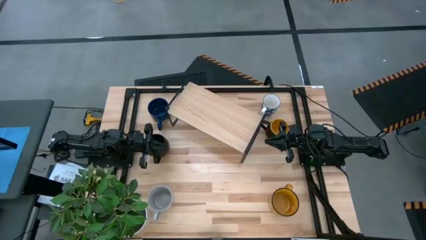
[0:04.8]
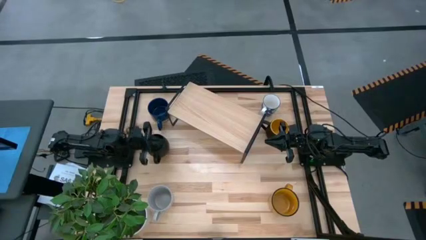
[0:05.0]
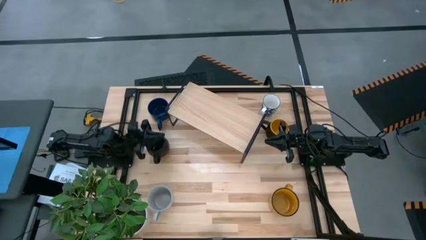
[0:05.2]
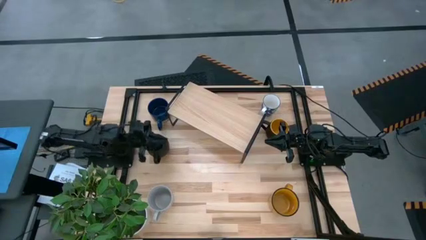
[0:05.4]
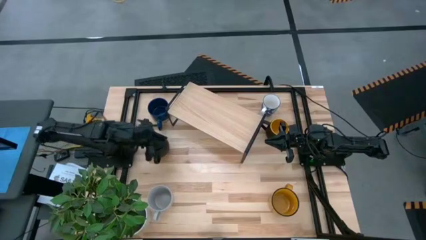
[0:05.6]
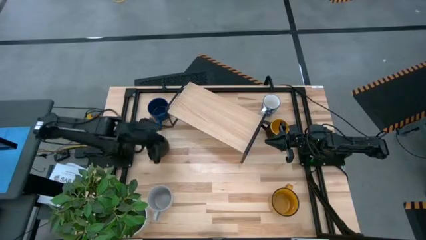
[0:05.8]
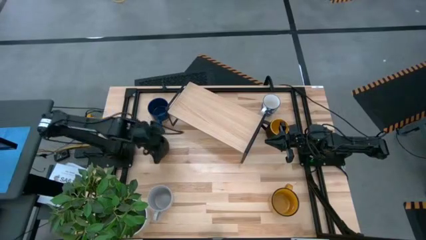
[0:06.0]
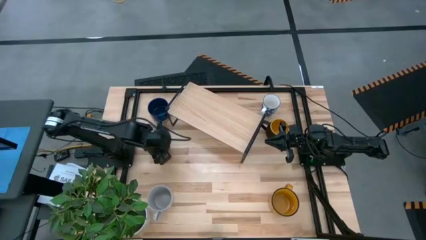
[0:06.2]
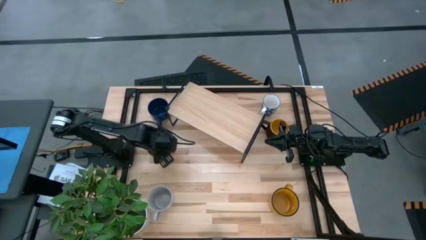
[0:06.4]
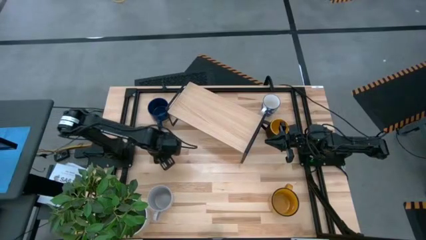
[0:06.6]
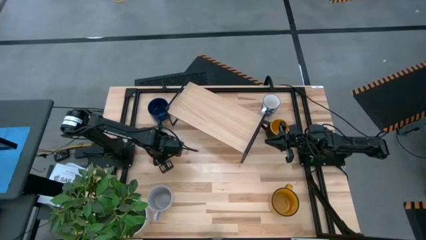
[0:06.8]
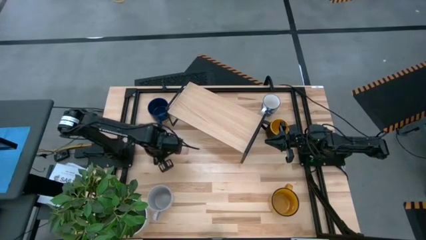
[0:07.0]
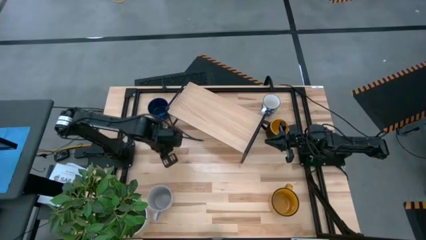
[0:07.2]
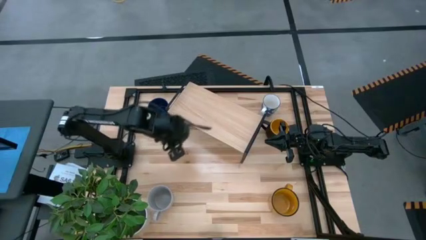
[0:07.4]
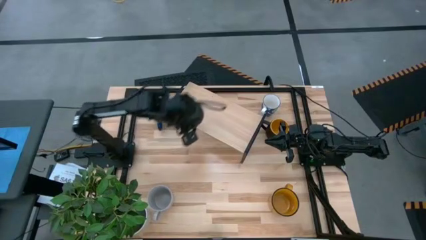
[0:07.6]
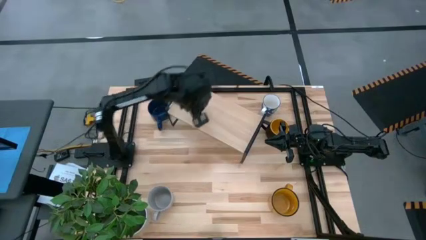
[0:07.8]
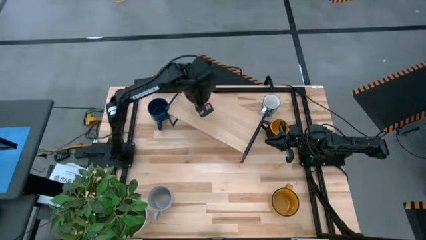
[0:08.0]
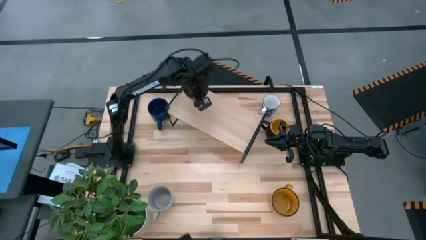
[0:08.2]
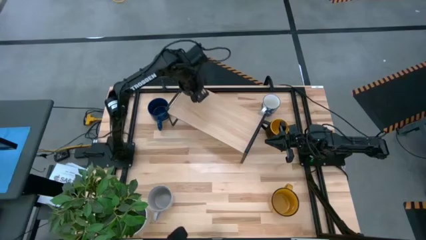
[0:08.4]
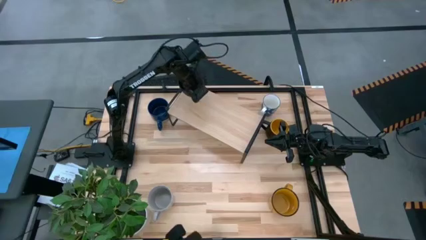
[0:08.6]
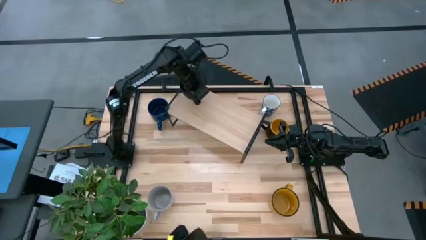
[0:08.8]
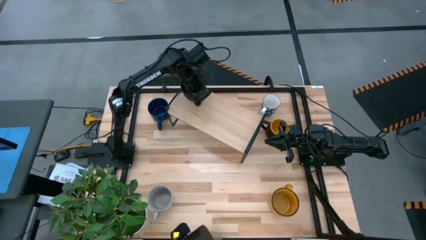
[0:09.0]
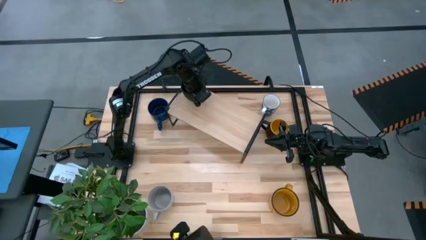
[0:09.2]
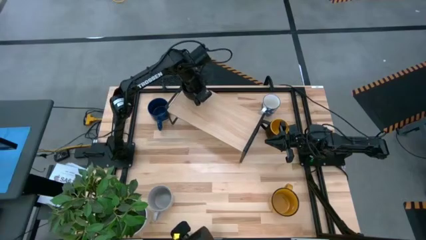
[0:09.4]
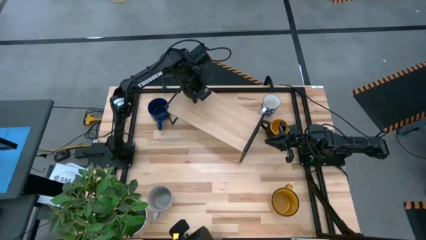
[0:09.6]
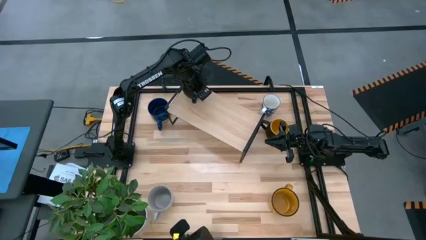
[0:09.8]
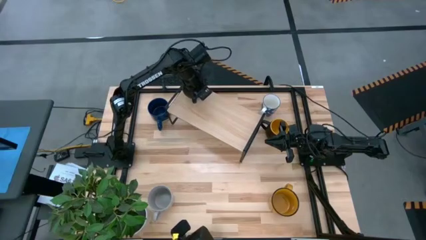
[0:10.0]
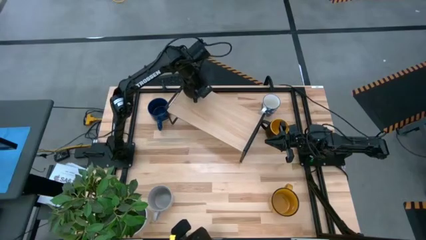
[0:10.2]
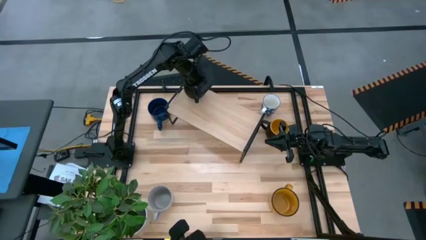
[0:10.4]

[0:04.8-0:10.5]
Task: Place coffee mugs
Put the black mug on the shelf

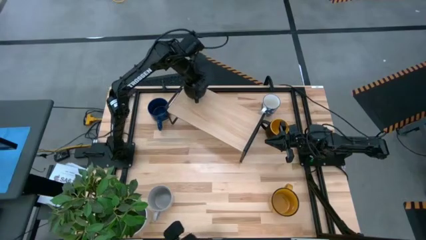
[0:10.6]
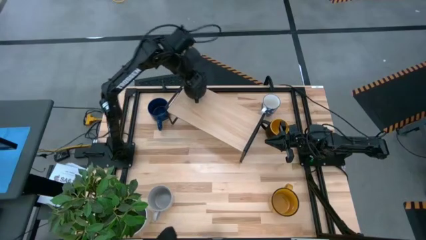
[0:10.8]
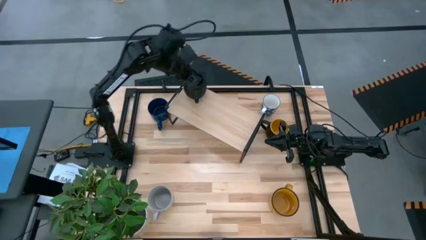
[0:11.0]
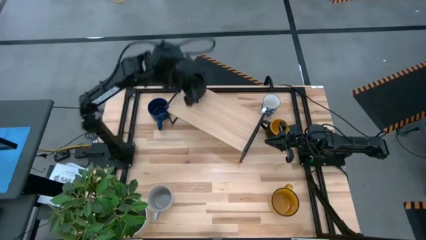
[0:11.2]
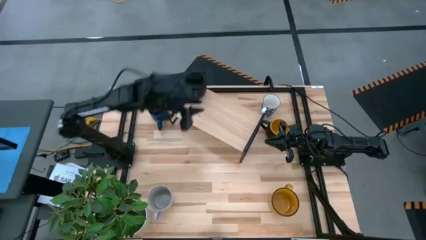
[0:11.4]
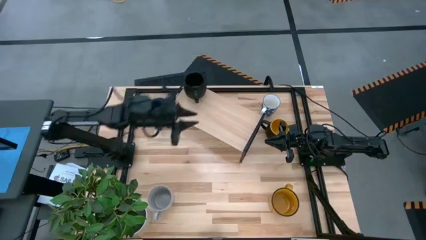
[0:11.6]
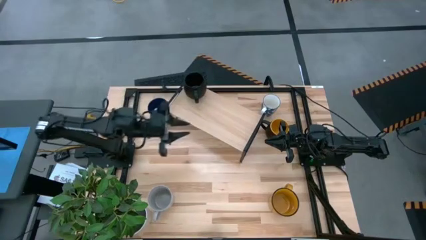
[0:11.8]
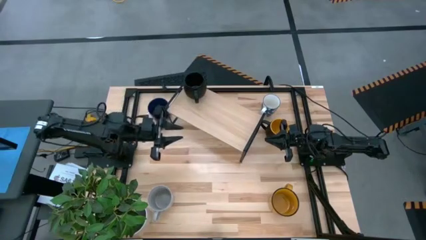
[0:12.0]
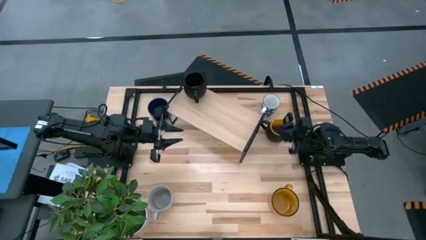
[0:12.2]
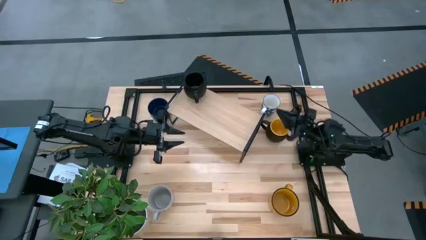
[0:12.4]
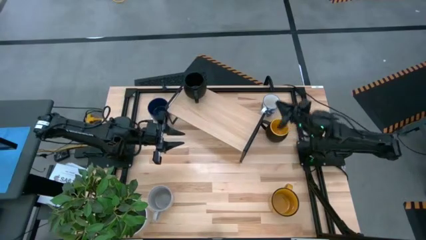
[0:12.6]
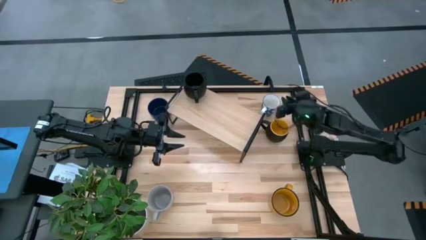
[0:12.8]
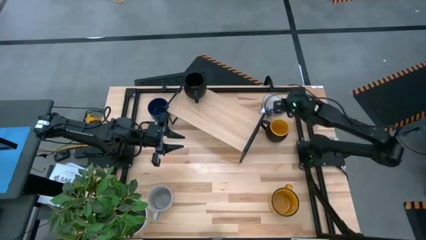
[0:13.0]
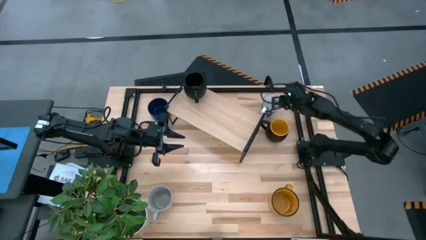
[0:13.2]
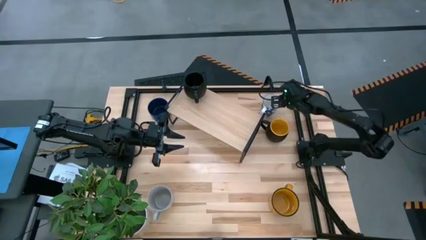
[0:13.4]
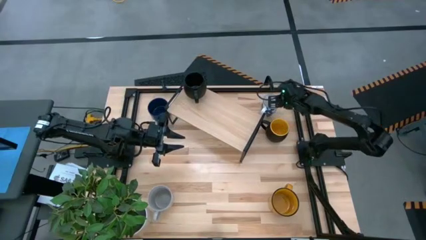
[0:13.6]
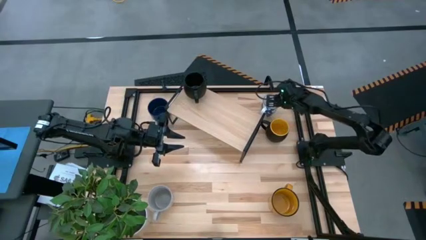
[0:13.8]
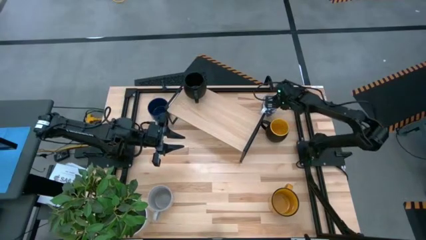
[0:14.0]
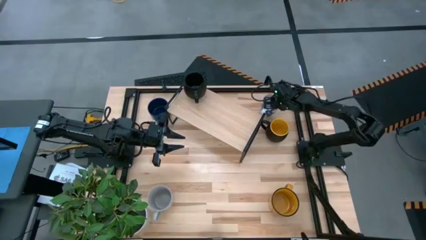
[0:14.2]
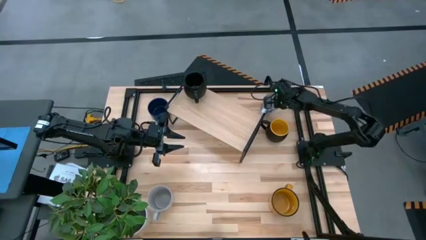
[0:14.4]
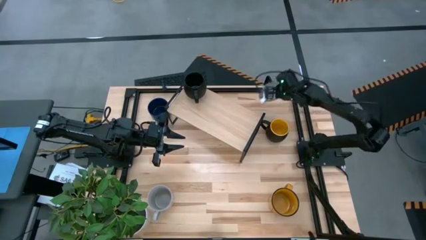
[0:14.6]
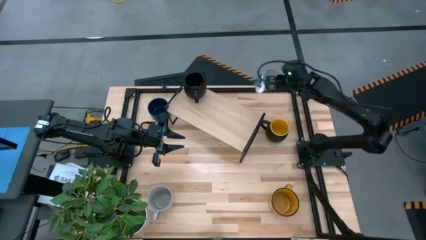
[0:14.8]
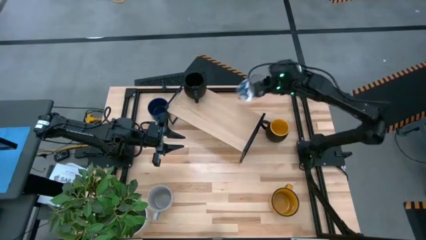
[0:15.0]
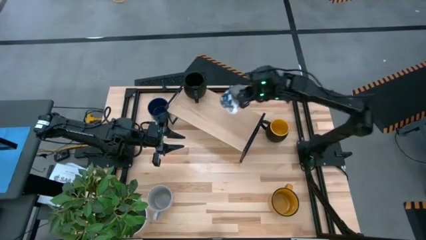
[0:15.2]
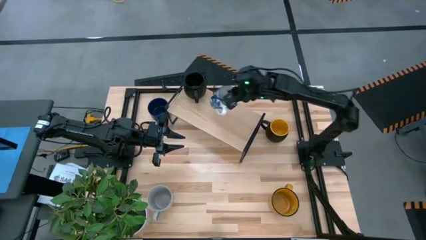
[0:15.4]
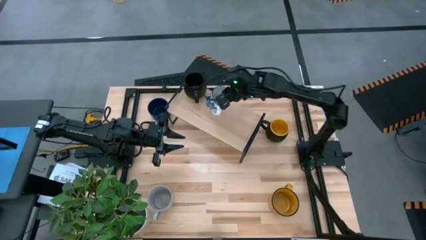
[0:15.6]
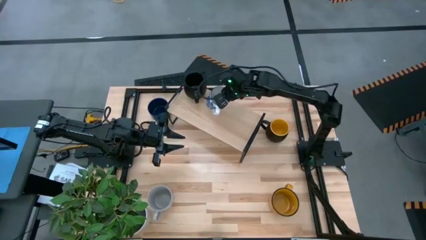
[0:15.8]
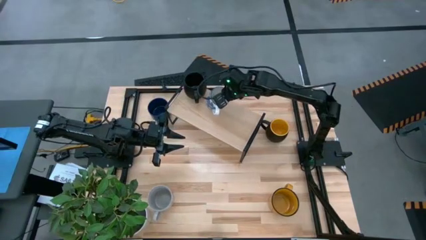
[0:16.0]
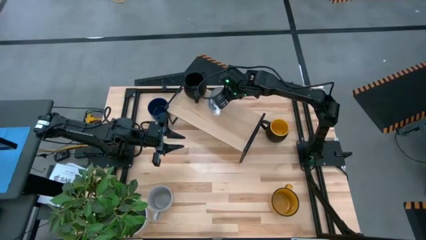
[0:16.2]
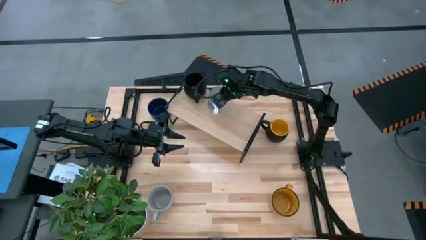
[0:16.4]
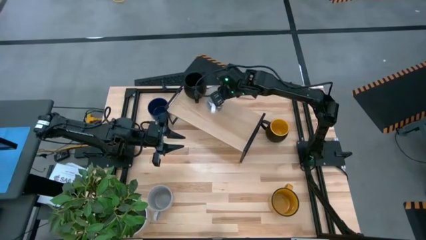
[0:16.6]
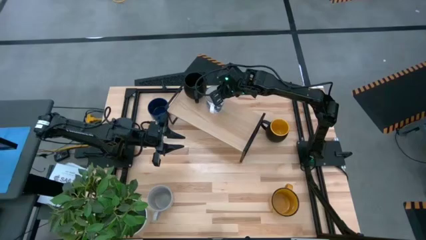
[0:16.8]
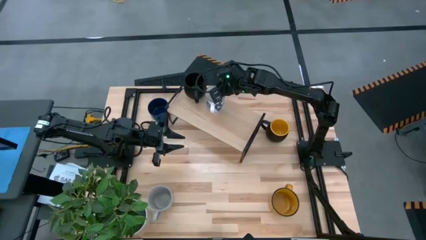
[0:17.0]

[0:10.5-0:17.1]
Put the blue-white mug on the shelf

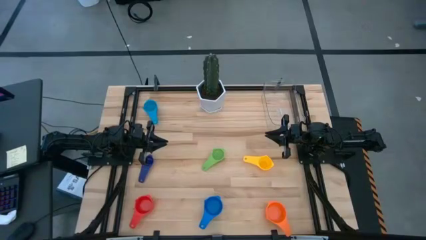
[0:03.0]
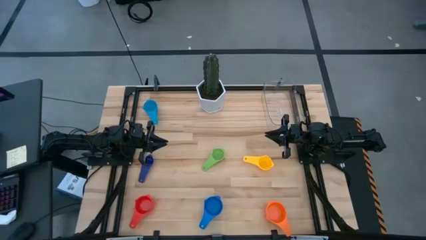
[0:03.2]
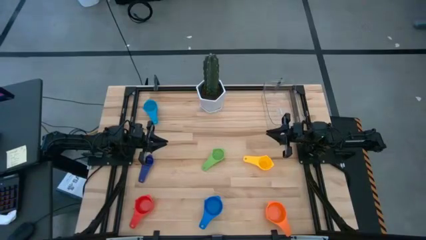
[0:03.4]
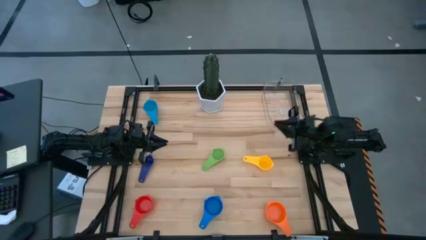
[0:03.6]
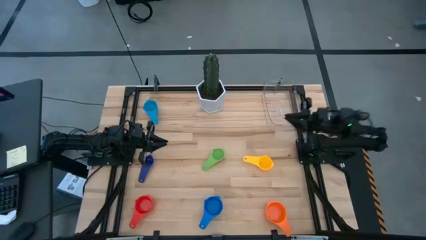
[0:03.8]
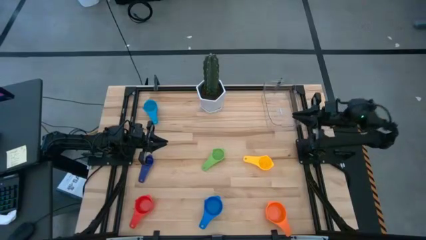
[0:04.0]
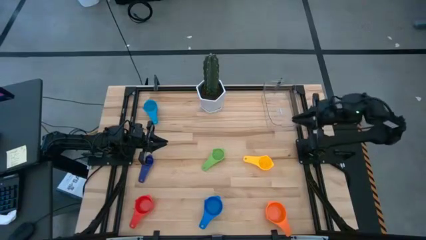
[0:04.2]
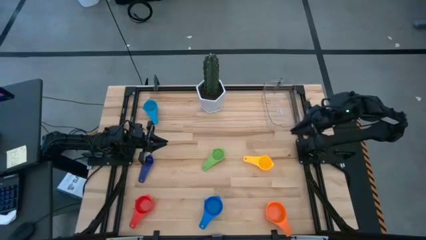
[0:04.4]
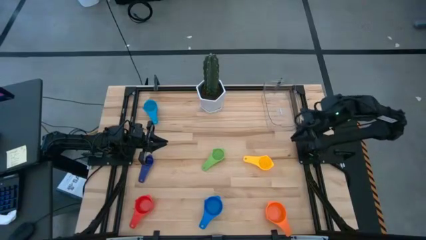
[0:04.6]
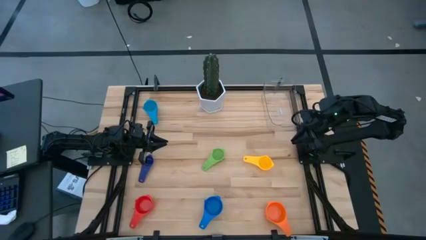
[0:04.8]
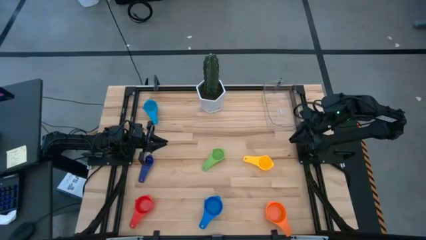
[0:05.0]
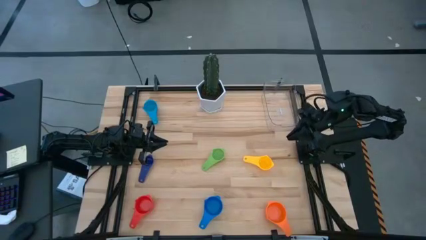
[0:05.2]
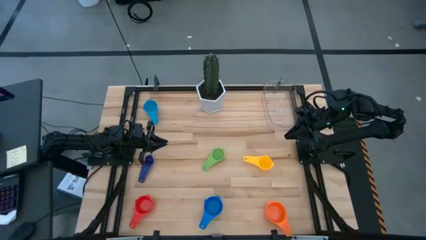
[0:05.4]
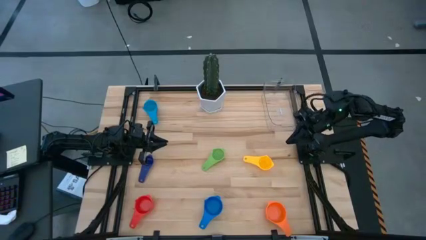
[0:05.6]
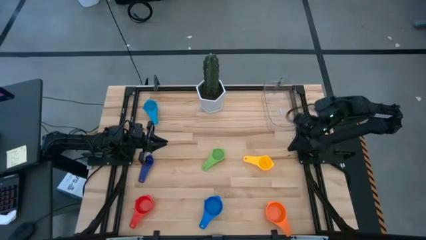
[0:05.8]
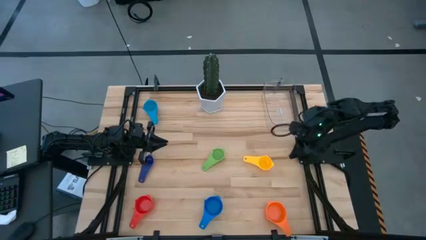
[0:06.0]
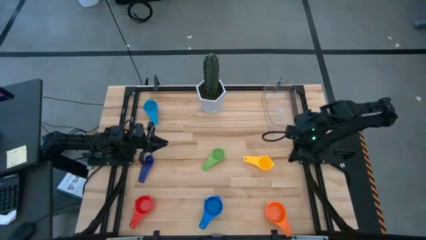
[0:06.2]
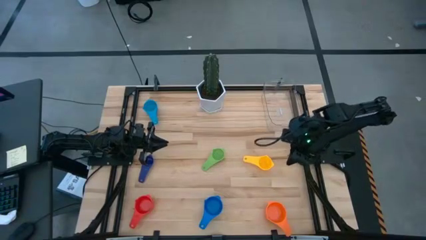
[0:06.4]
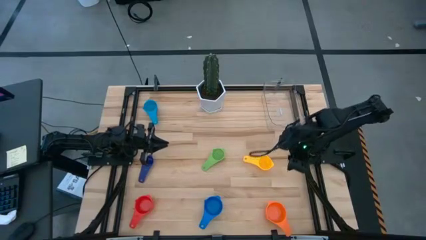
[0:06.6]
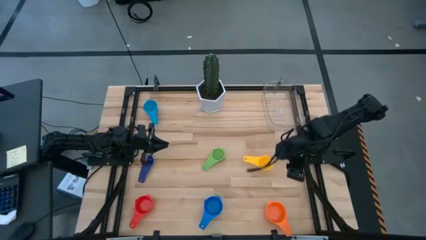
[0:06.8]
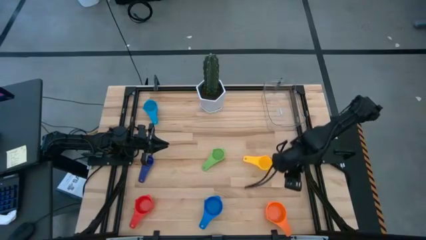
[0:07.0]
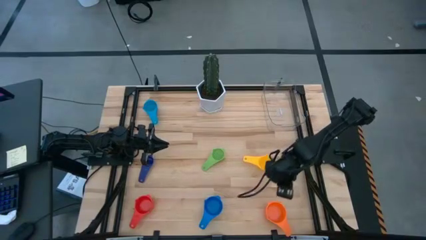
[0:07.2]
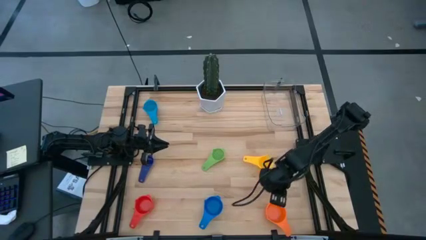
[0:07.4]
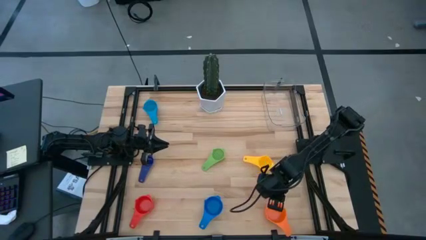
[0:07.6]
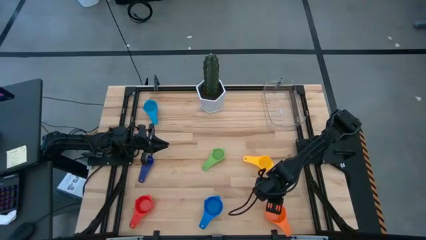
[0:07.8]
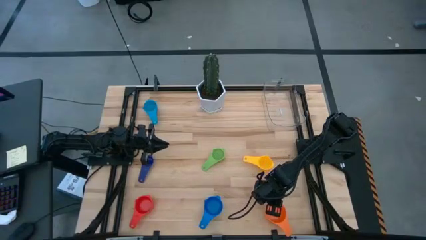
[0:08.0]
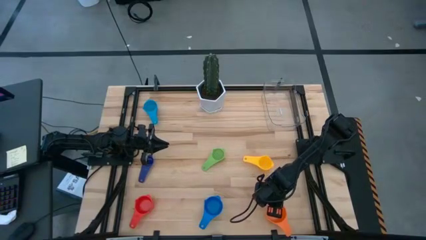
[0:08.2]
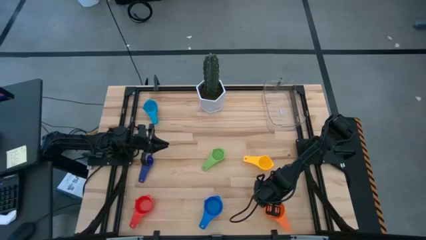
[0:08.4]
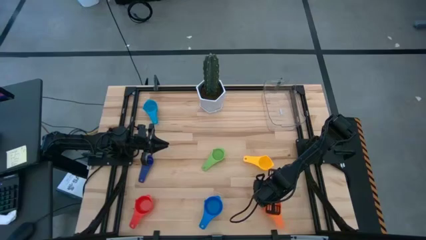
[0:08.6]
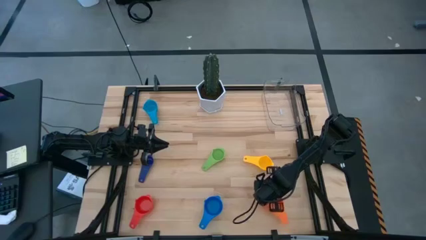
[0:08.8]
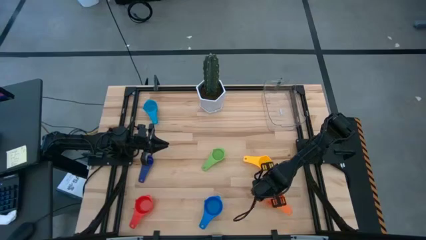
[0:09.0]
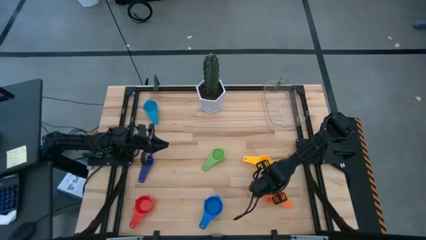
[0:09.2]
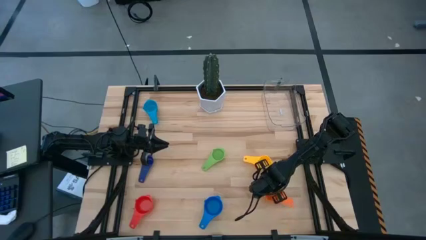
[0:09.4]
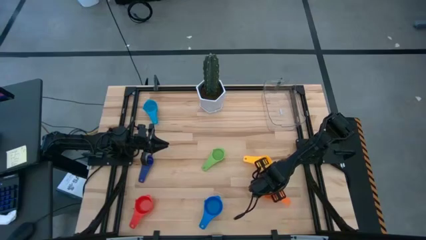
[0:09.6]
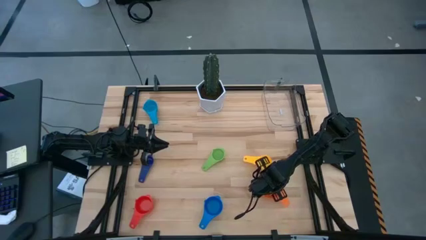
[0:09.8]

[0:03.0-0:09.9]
Task: Nest measuring cups in basket
Adjust the orange measuring cup
